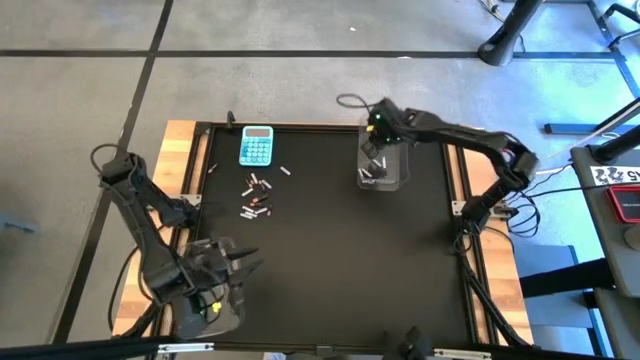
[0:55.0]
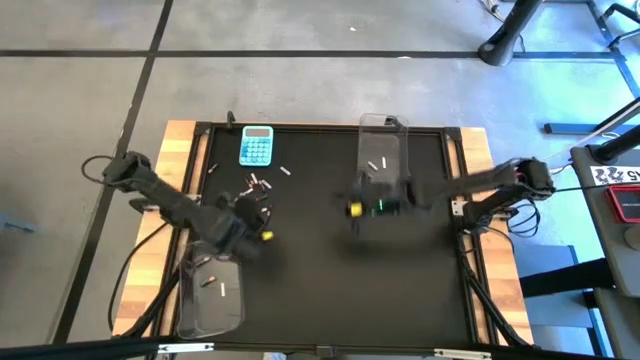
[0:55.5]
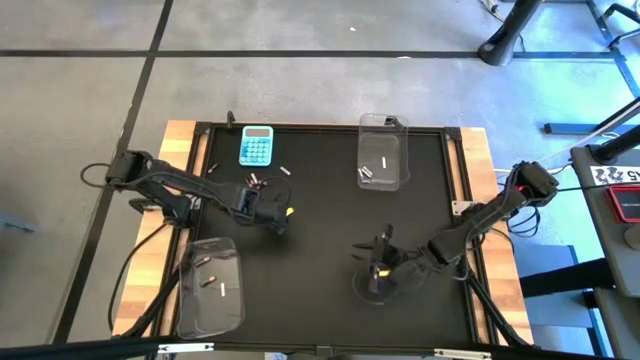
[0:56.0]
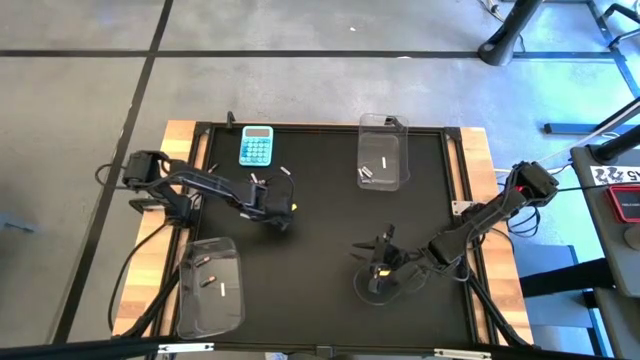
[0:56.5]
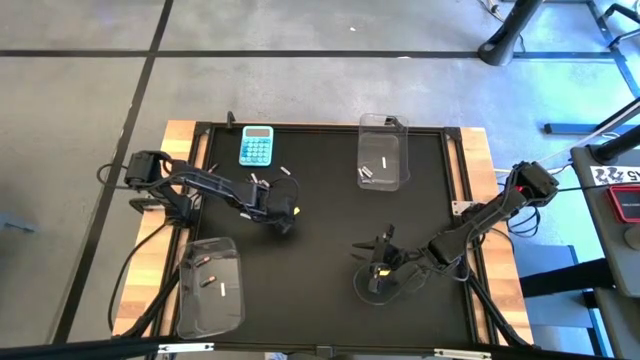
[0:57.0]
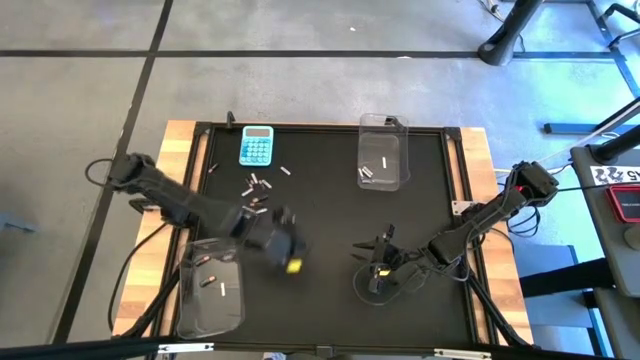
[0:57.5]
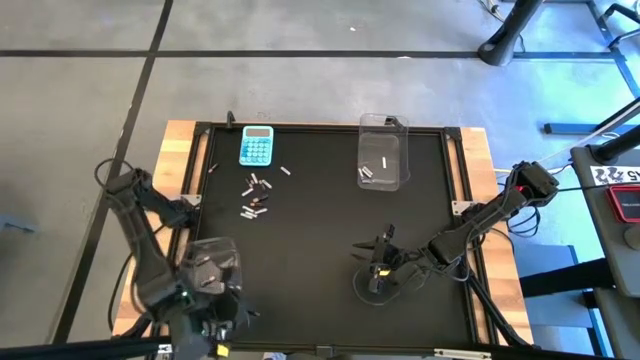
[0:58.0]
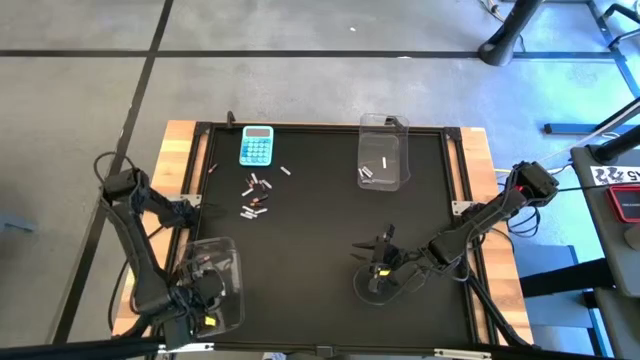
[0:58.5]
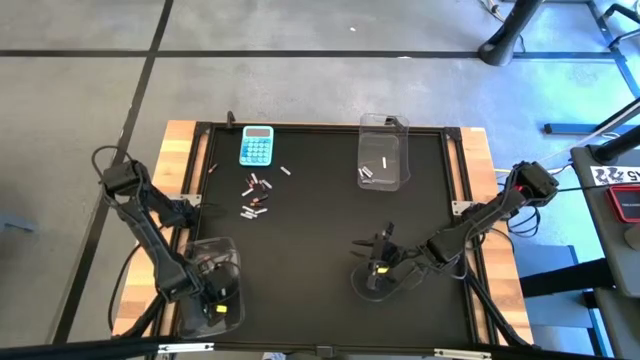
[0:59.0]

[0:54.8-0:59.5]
Task: Sort batteries
Put the black battery into the bottom transparent bin

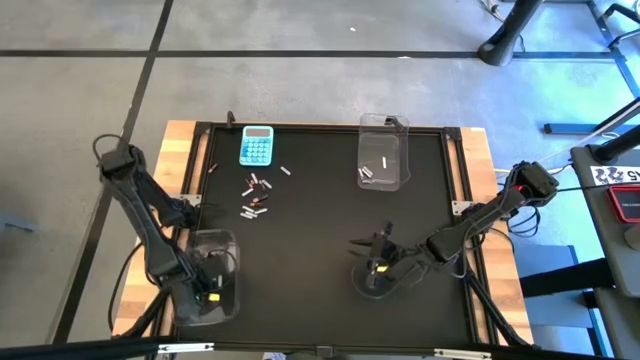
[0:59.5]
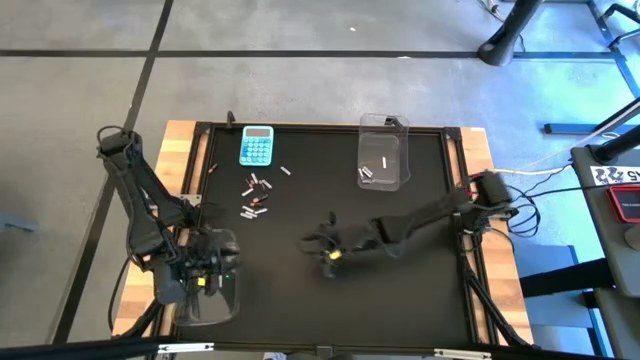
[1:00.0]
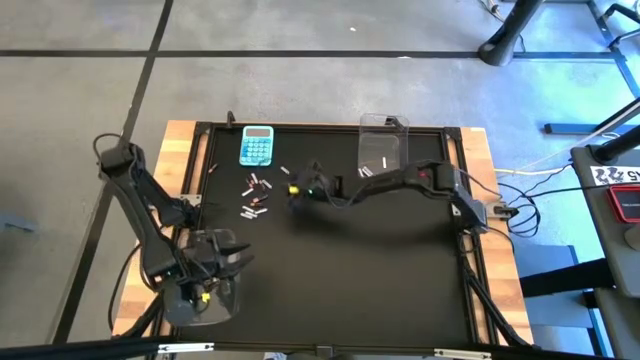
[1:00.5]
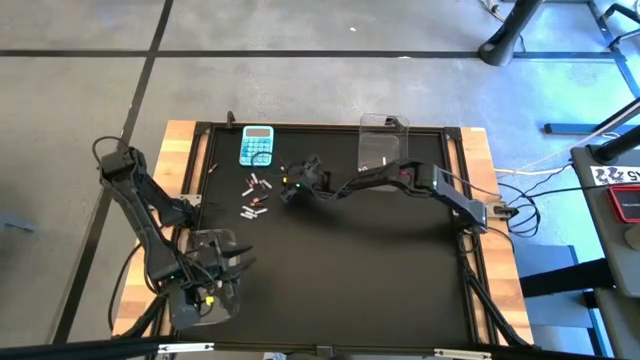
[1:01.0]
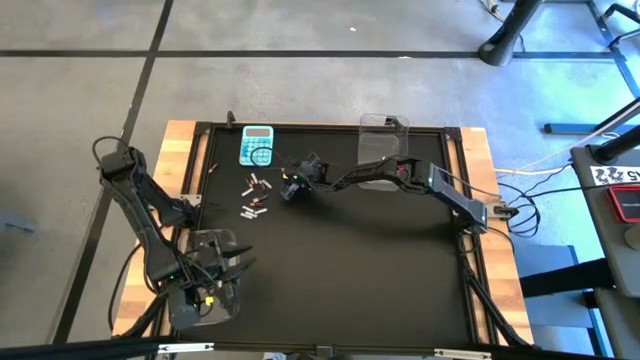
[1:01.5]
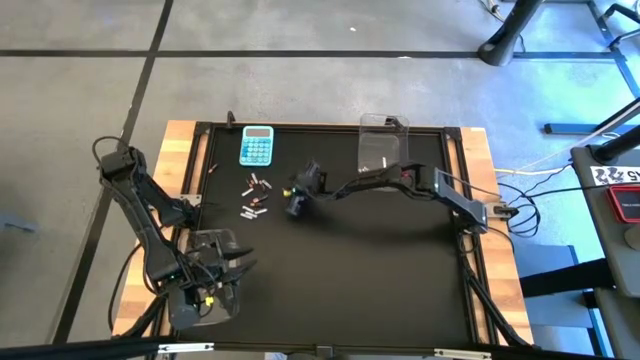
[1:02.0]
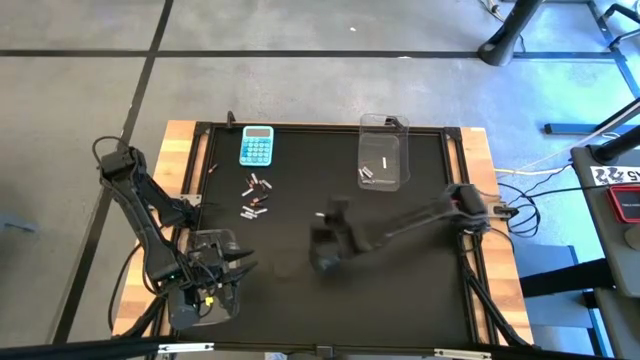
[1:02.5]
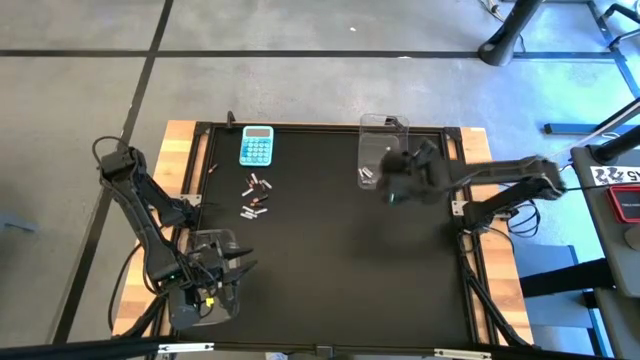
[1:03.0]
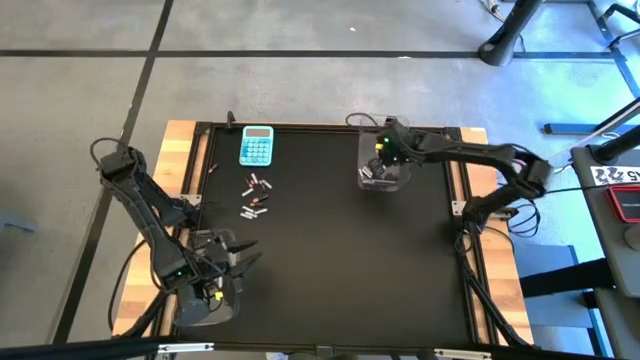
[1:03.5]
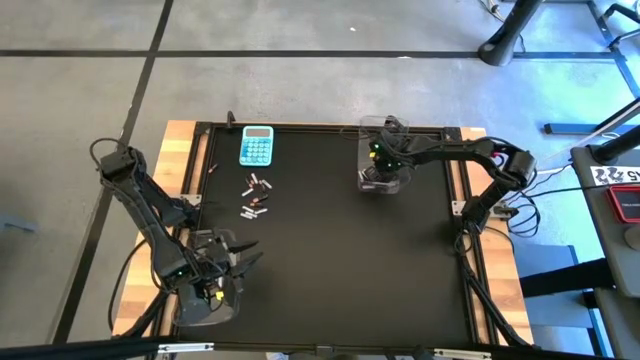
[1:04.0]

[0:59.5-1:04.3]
Put the white battery into the top transparent bin

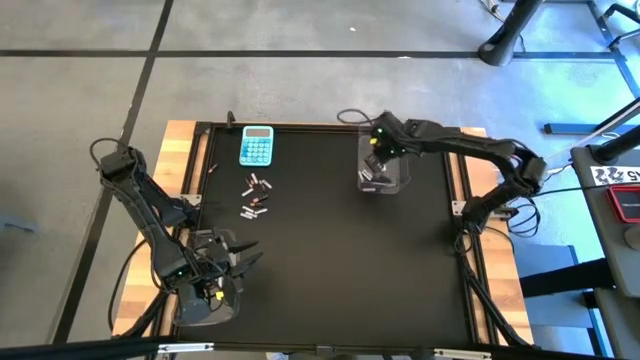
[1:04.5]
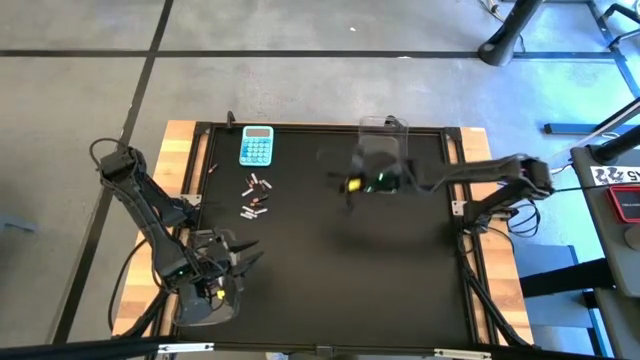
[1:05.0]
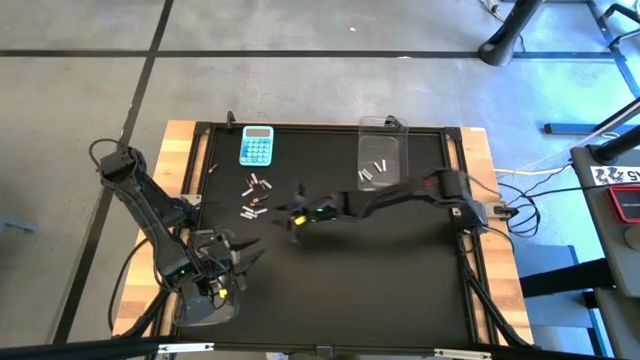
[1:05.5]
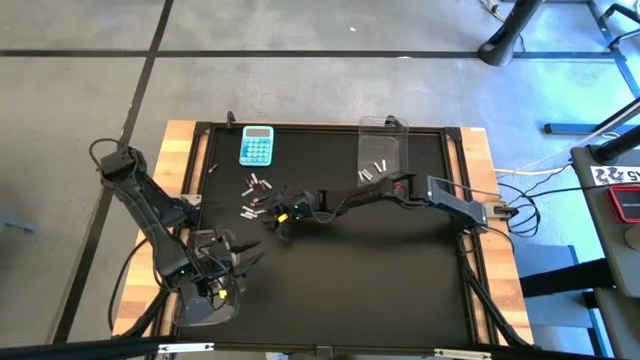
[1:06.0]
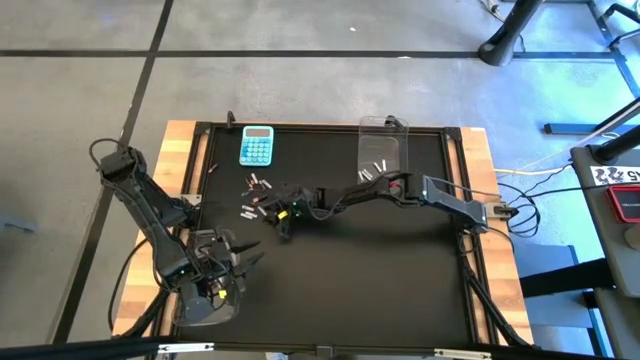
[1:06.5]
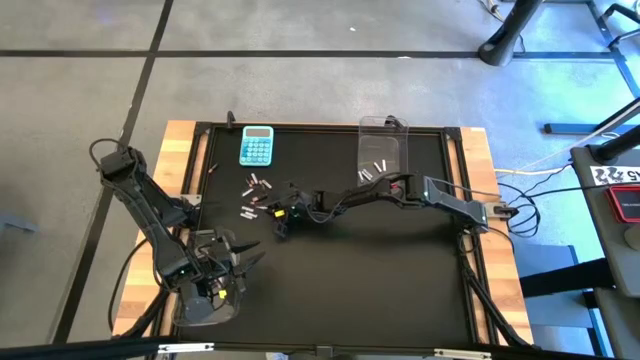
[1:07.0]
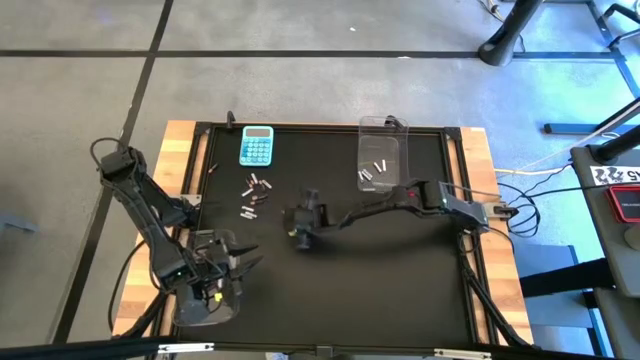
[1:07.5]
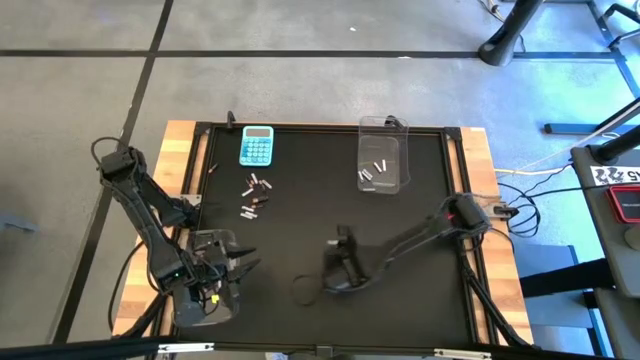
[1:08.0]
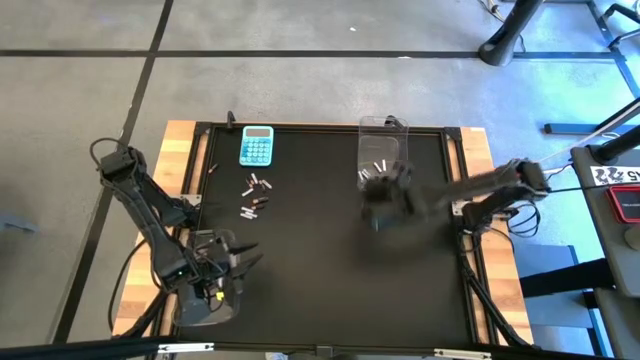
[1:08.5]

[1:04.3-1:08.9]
Put the white battery into the top transparent bin

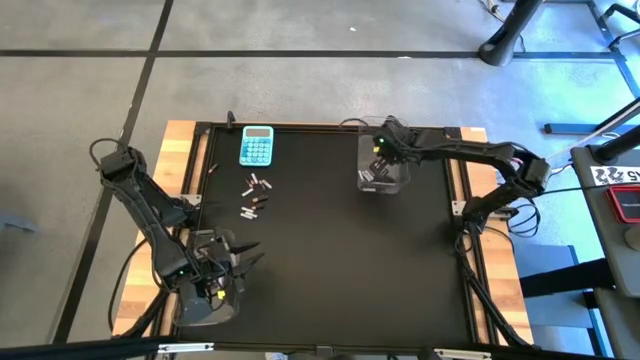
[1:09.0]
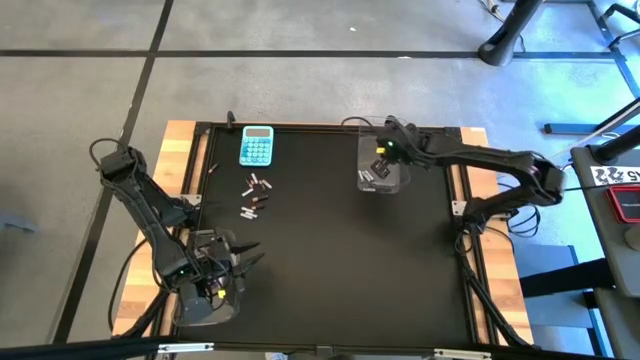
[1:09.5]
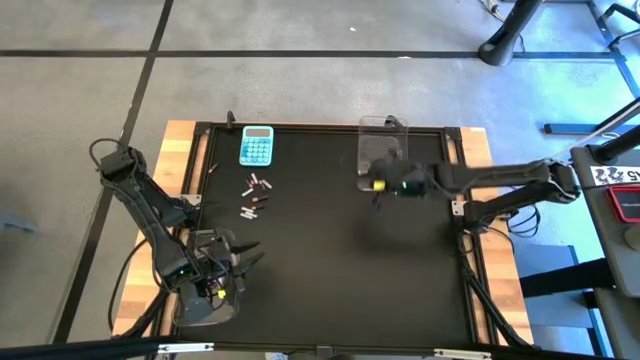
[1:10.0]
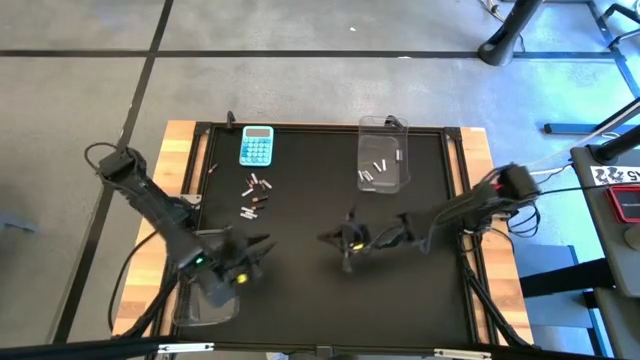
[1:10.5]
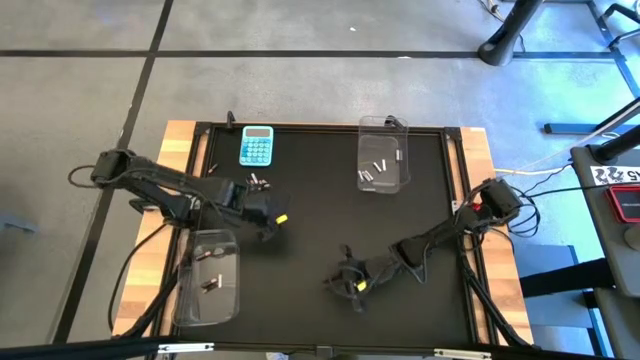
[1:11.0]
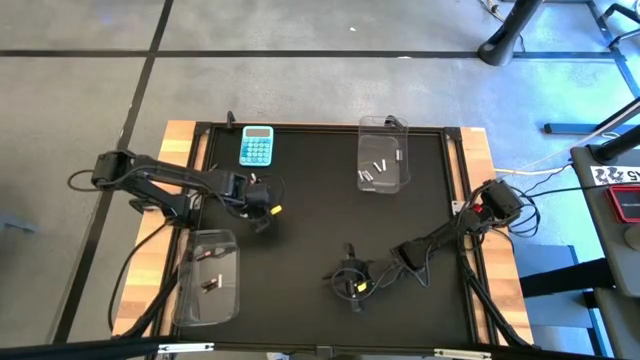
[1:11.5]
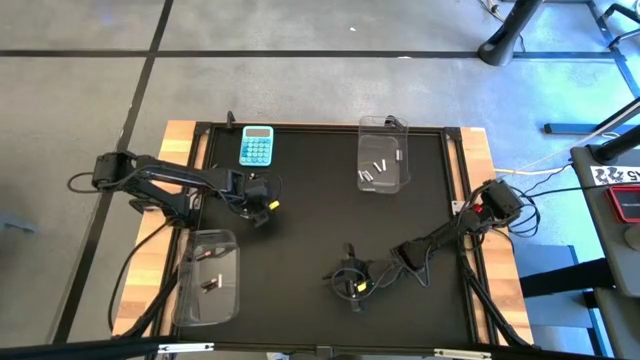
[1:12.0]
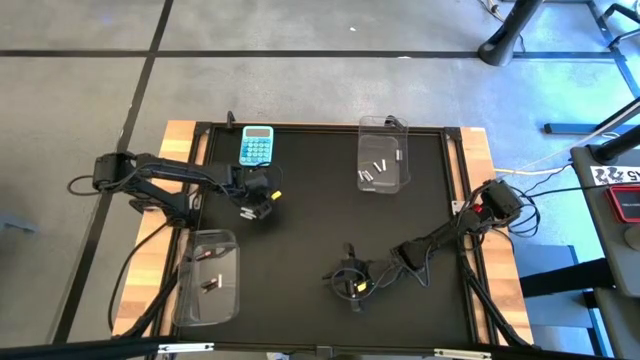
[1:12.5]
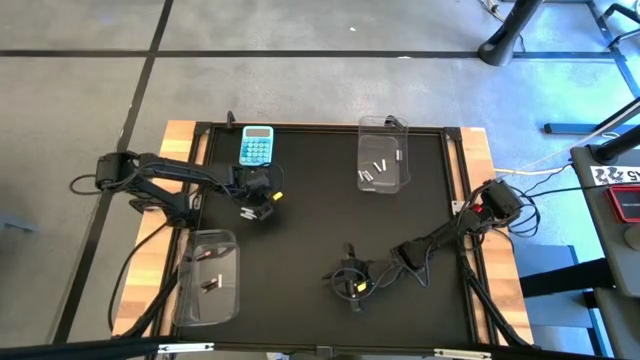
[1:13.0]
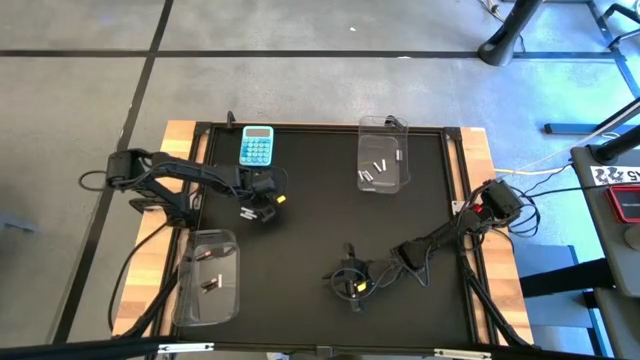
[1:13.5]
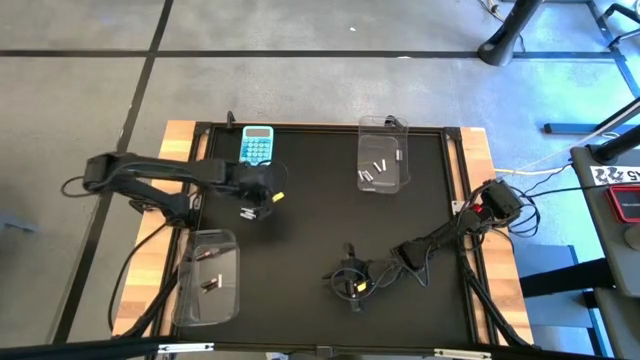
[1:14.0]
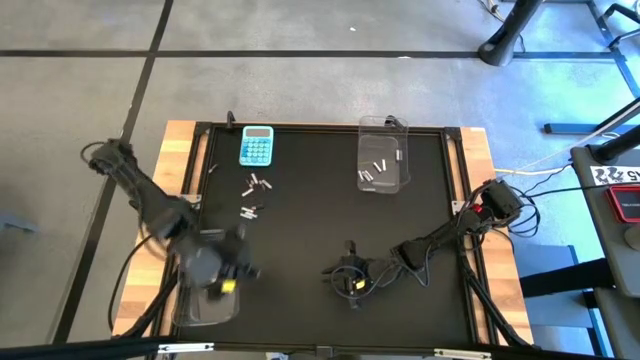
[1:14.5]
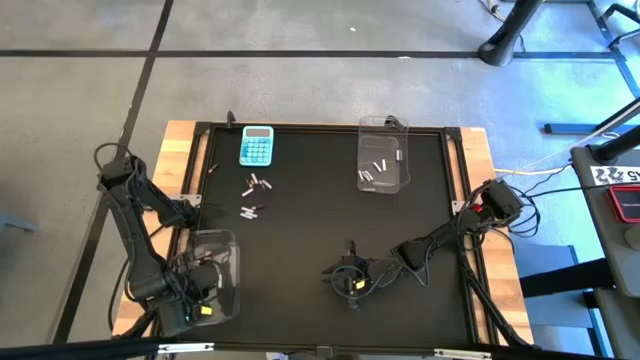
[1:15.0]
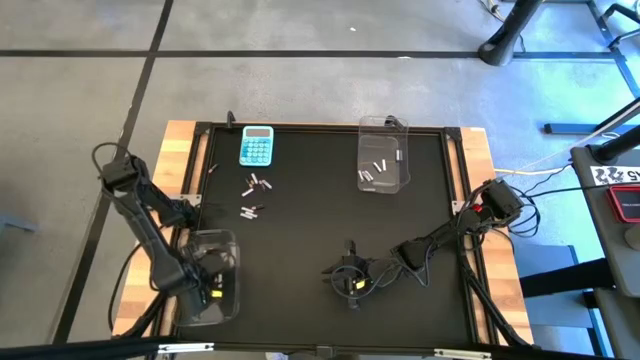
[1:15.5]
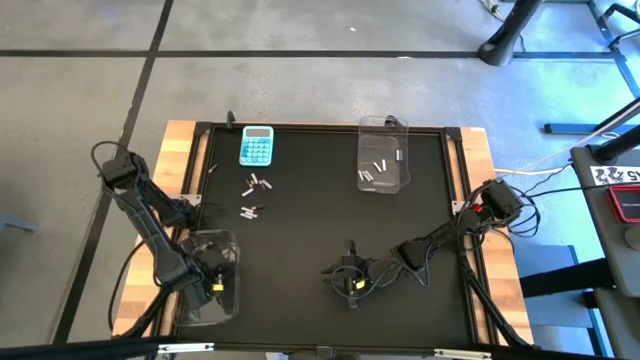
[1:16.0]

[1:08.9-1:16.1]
Put the black battery into the bottom transparent bin

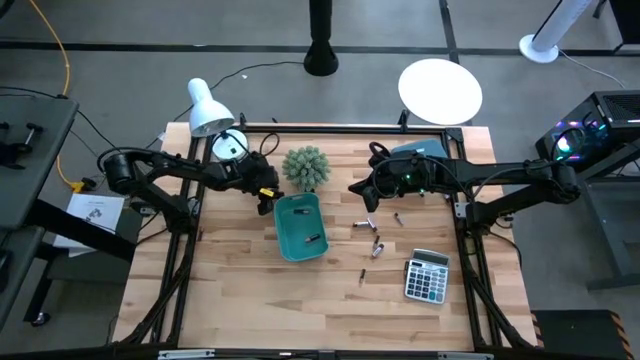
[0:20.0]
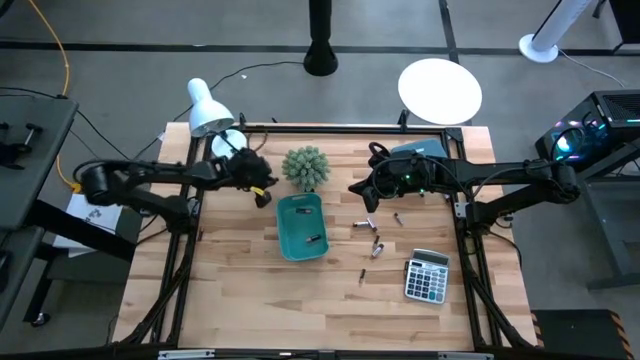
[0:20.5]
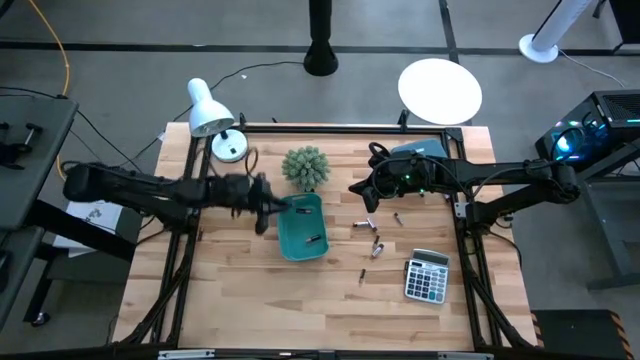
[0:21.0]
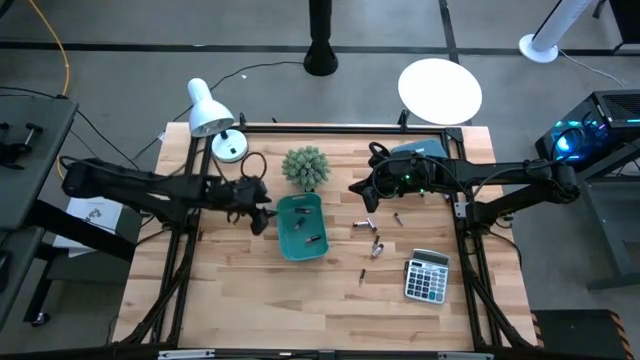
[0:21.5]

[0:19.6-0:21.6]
Task: Sort batteries
Put the black battery into the green bin
